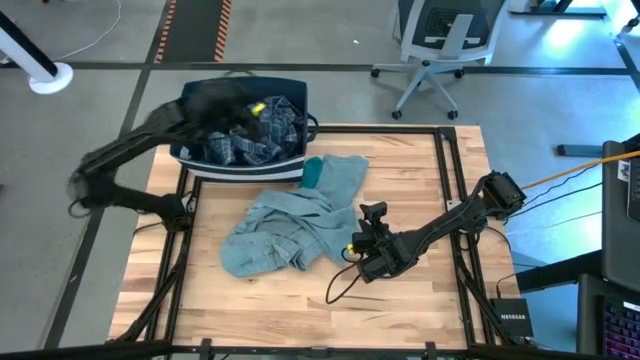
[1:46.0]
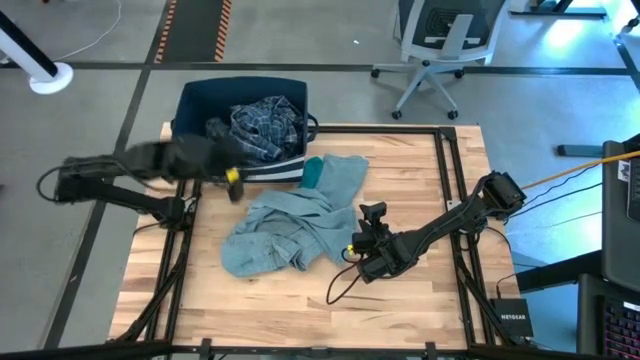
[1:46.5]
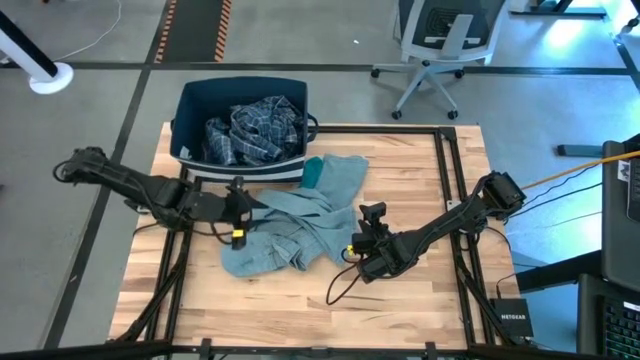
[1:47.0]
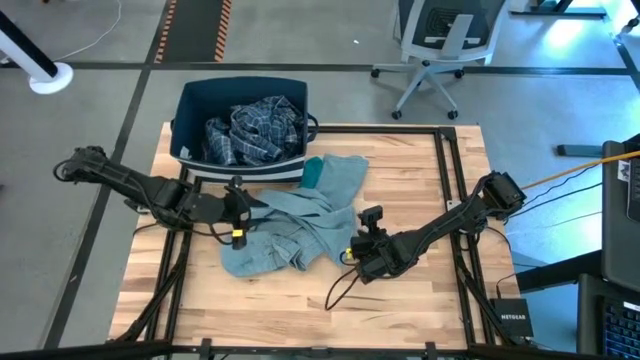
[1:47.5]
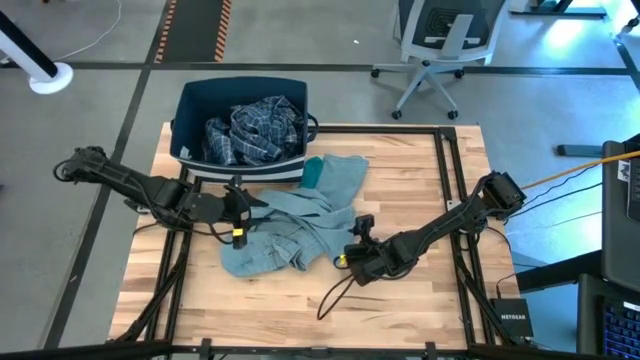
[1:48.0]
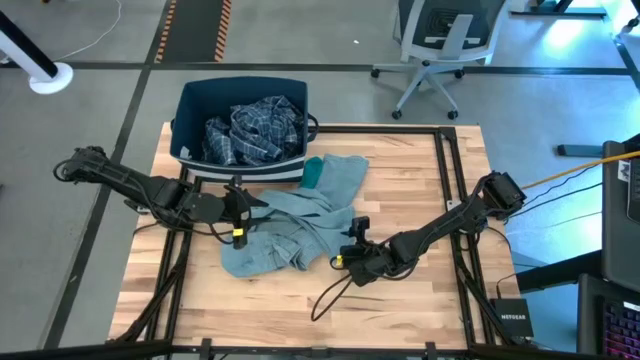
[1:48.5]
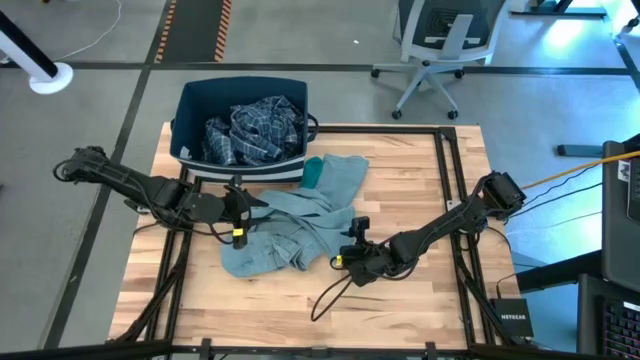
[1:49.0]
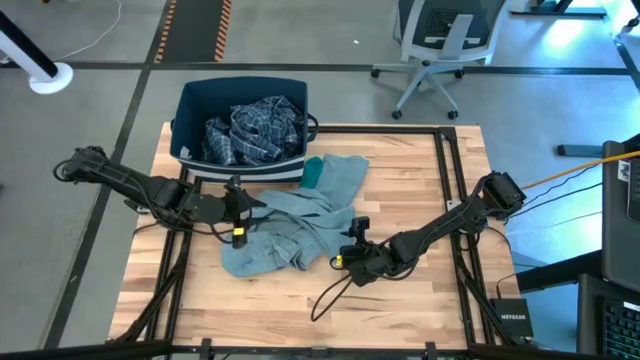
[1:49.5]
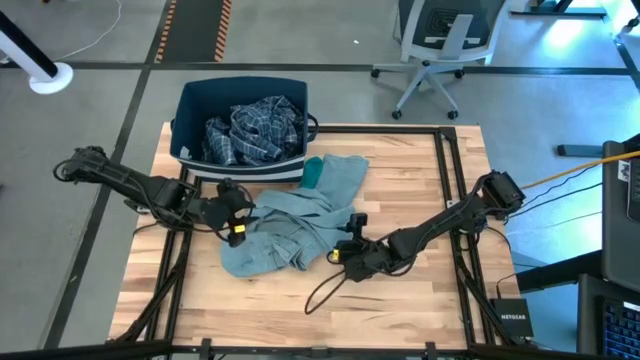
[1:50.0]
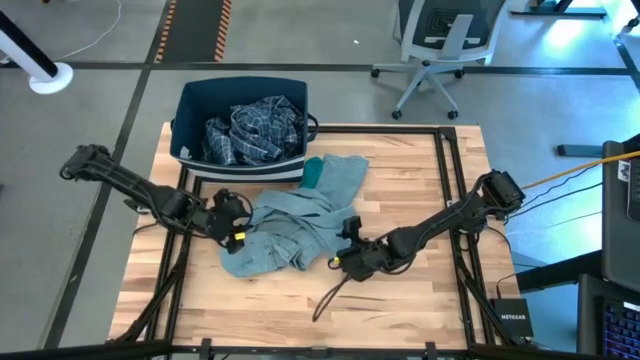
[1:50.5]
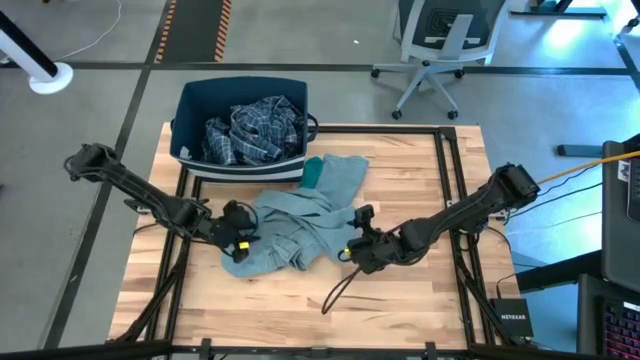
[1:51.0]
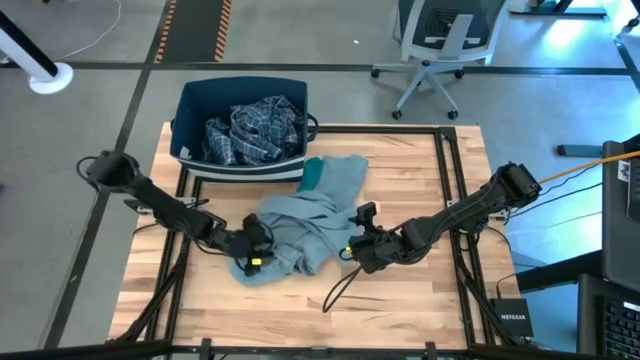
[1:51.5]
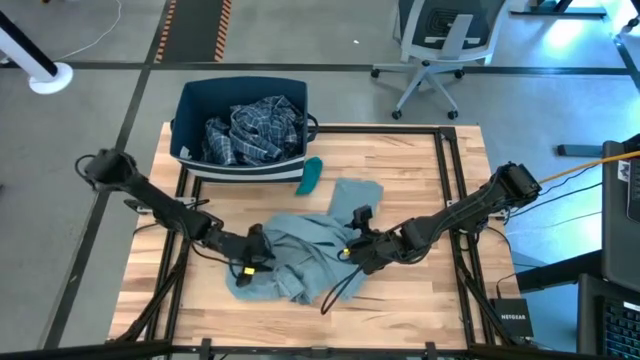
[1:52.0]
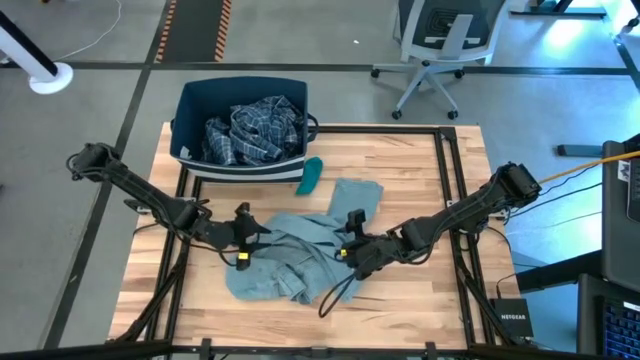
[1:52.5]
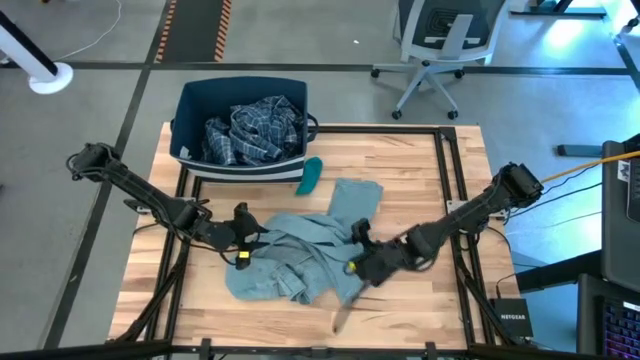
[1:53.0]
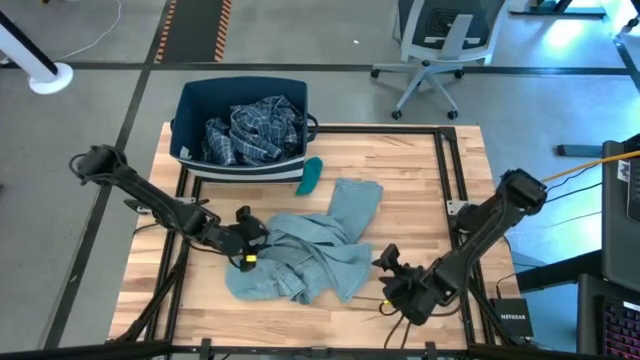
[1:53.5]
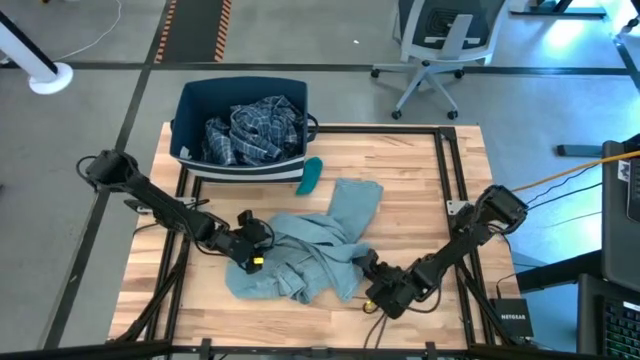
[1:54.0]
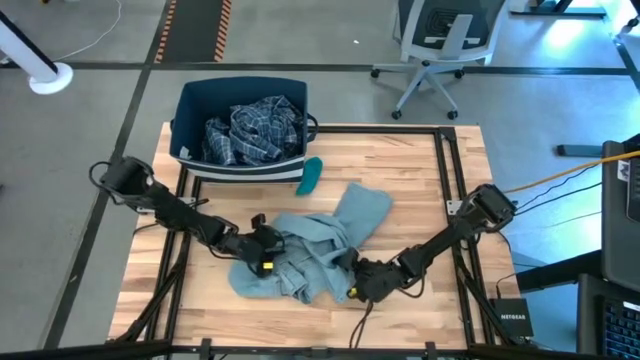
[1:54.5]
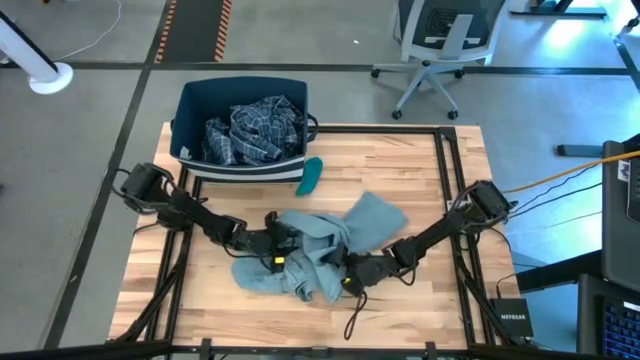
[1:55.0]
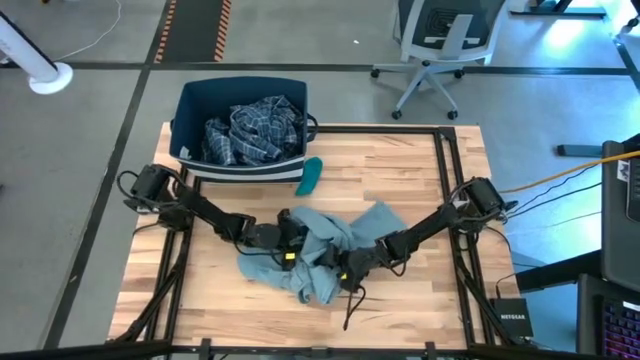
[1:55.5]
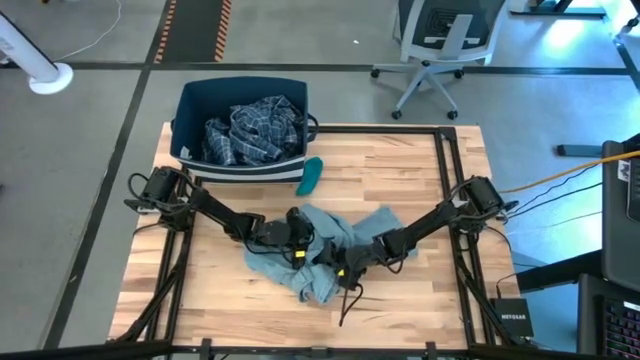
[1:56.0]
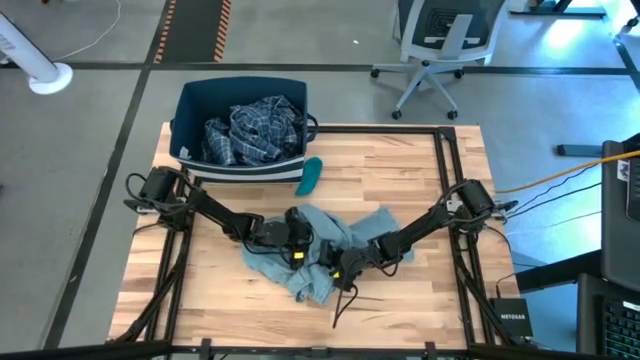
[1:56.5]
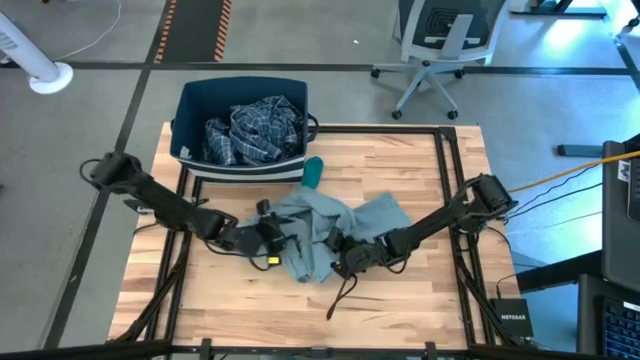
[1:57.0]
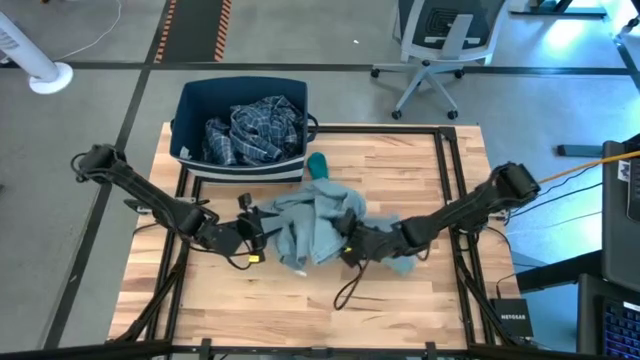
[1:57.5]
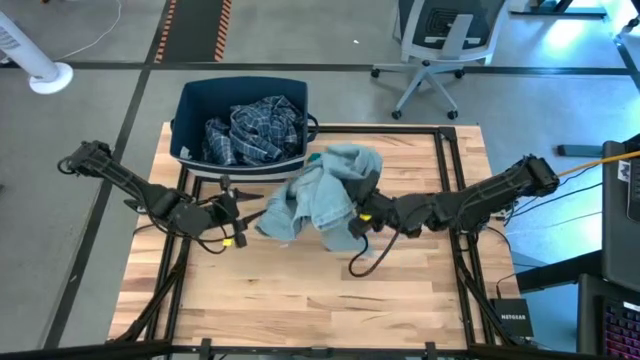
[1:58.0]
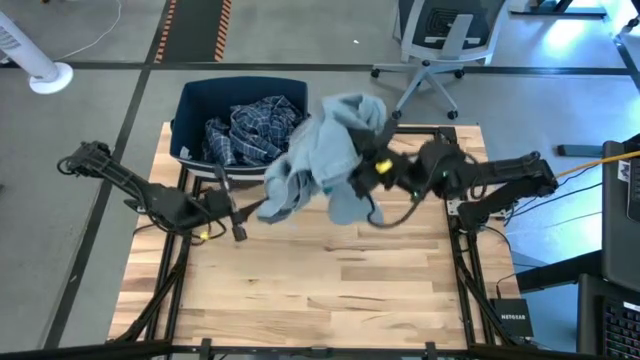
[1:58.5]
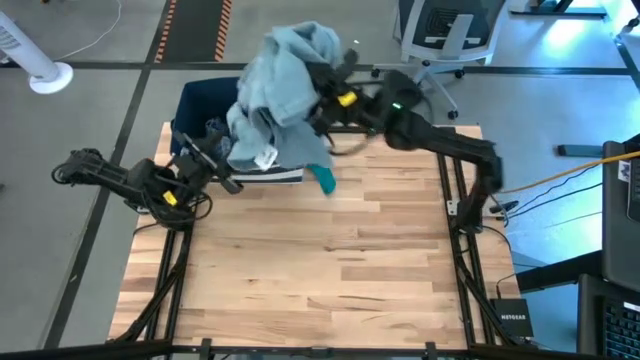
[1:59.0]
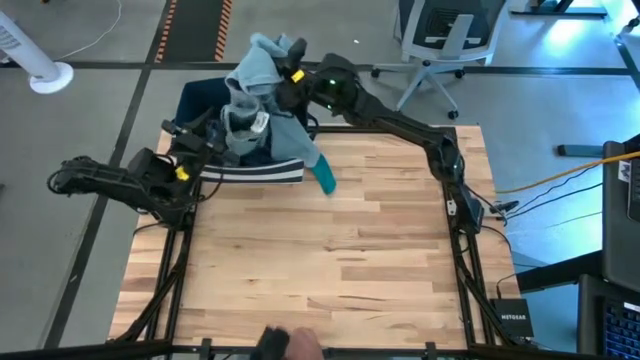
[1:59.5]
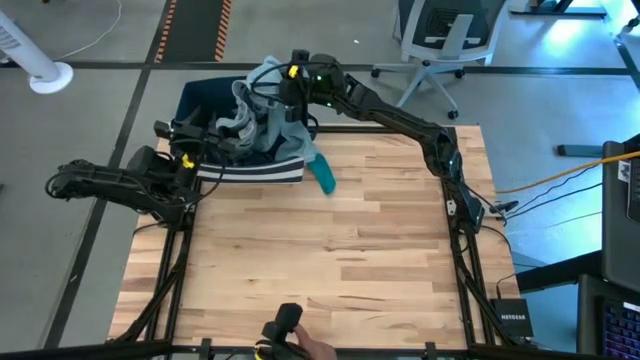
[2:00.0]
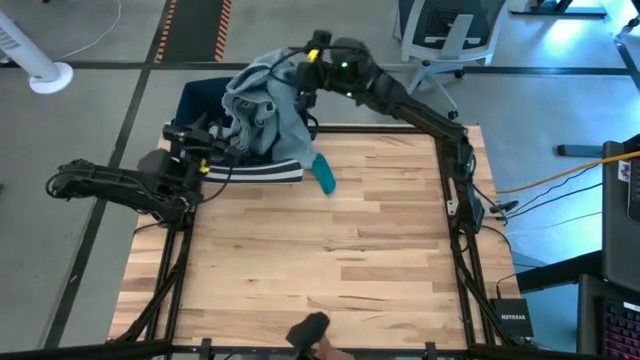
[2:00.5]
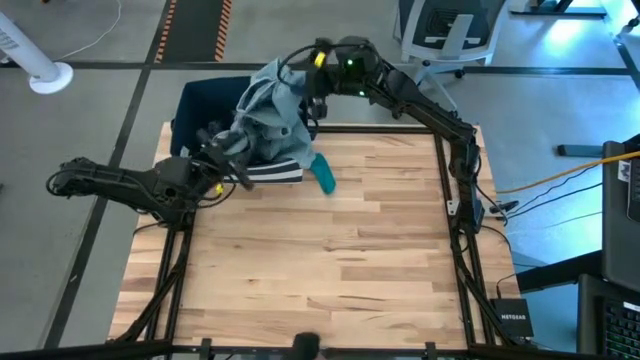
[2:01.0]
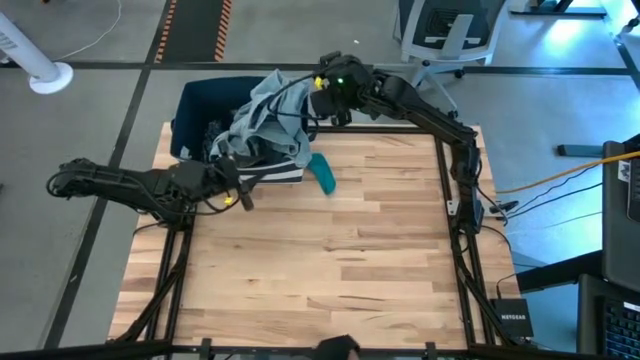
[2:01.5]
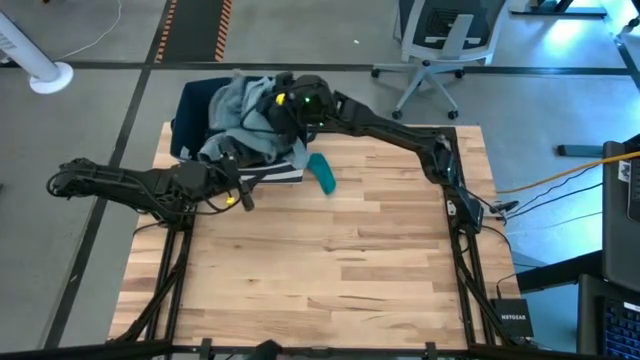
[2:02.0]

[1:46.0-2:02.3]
Task: Sort clothes
Put the light blue jeans into the blue laundry bin

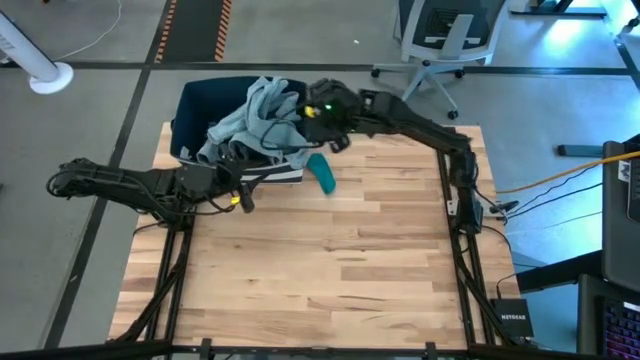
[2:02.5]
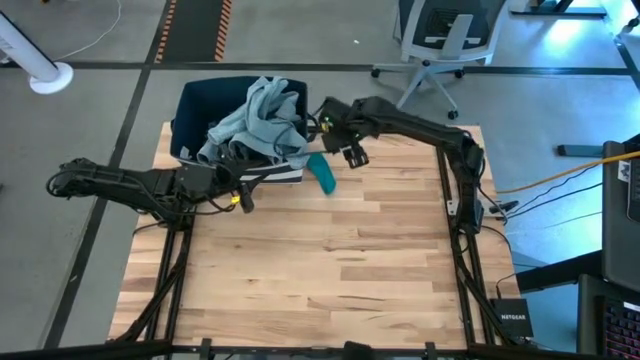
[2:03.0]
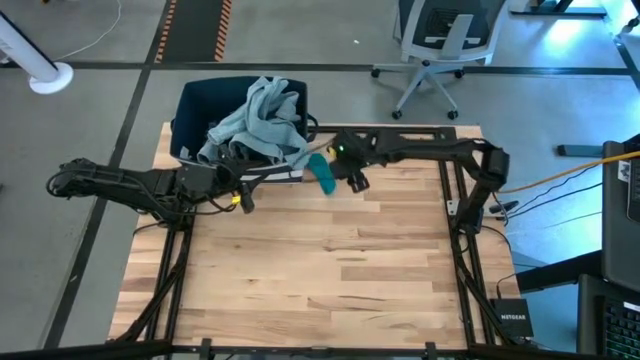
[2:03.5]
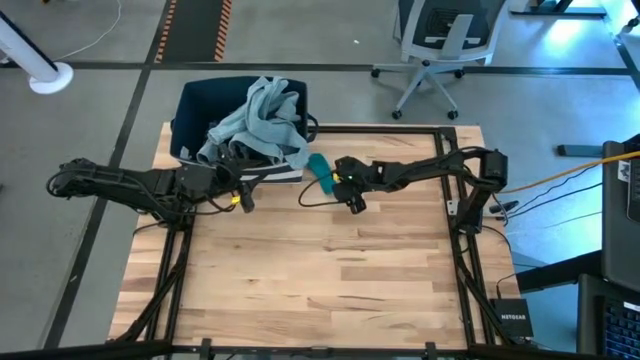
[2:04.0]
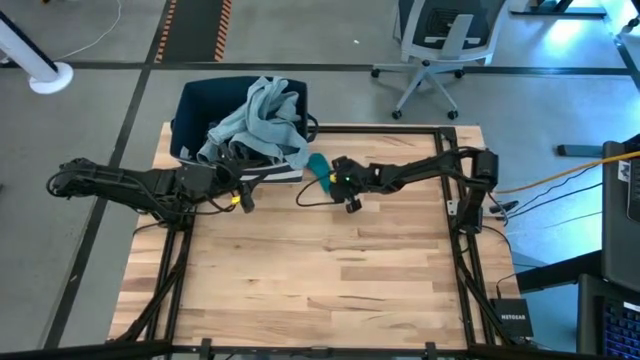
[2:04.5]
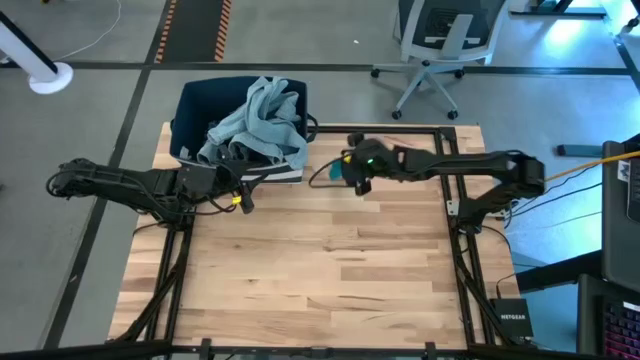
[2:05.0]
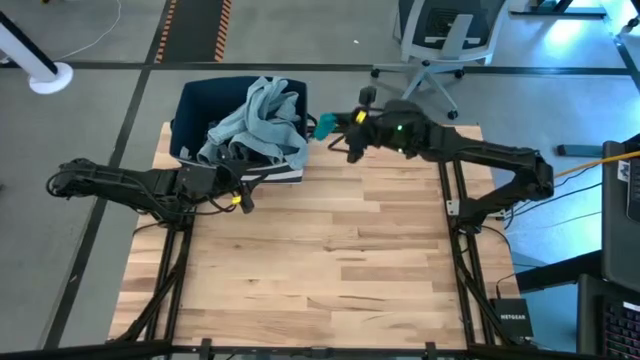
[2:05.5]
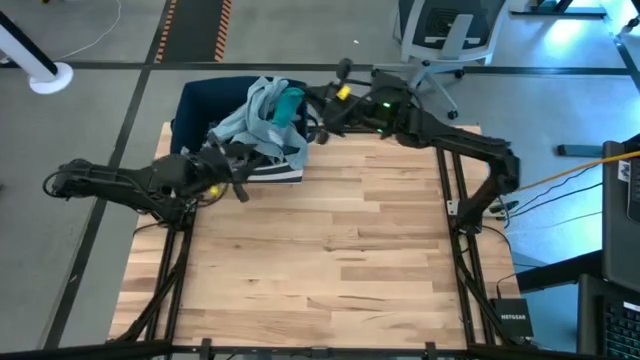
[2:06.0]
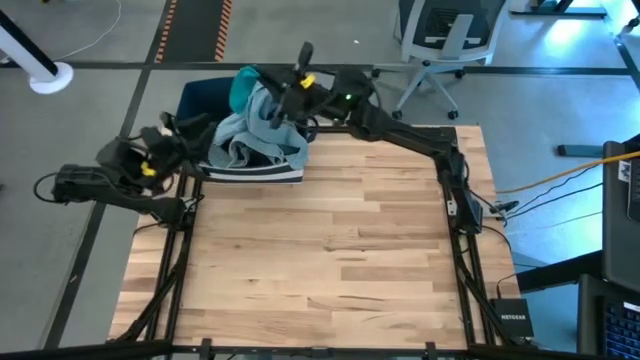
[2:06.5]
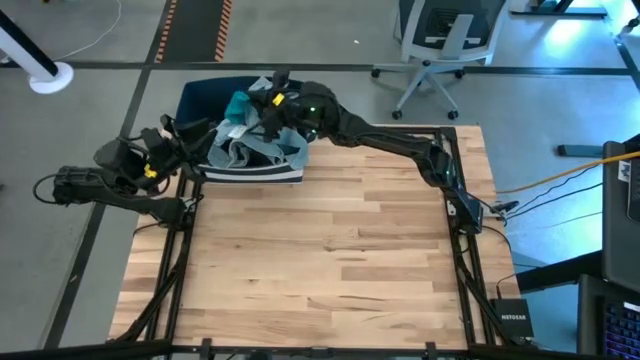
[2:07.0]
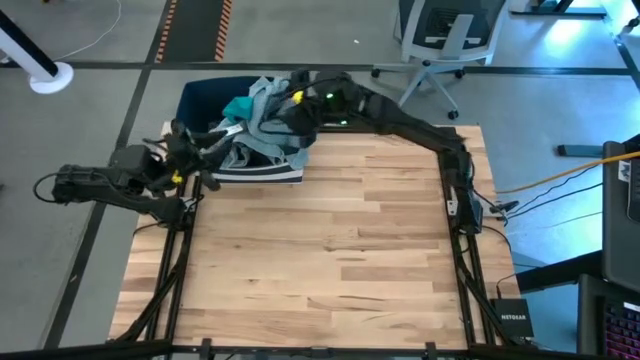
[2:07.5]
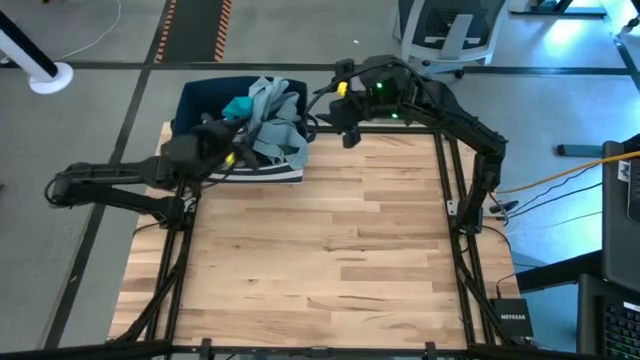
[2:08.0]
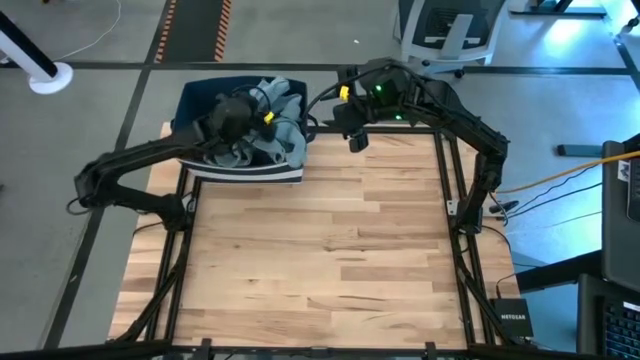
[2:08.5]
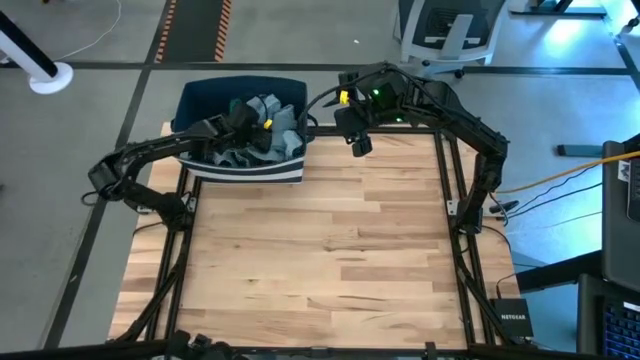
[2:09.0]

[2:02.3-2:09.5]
Put the blue sock into the blue laundry bin
